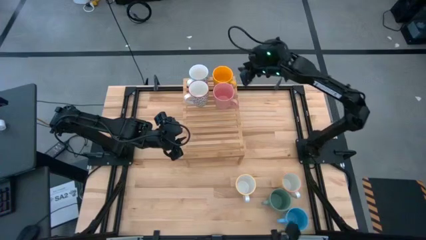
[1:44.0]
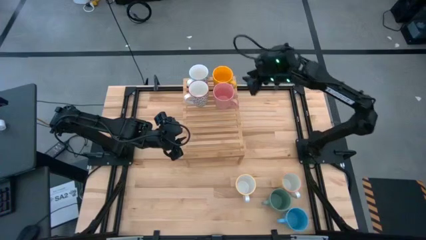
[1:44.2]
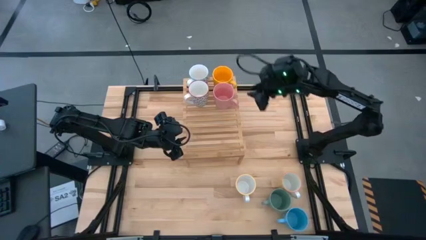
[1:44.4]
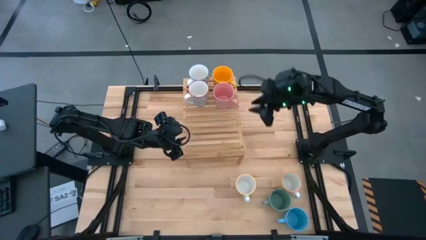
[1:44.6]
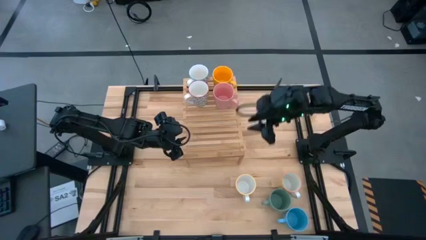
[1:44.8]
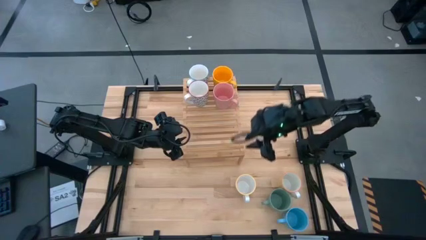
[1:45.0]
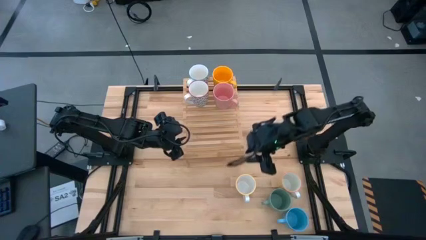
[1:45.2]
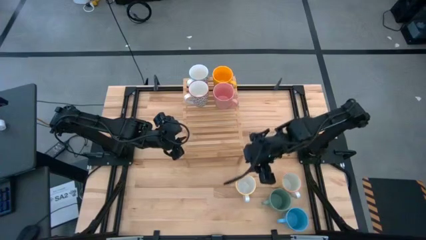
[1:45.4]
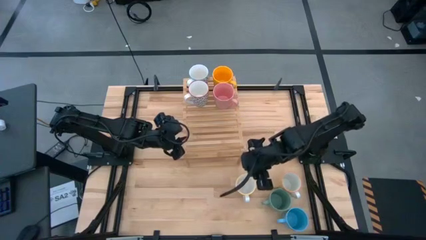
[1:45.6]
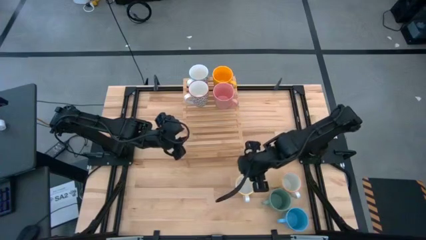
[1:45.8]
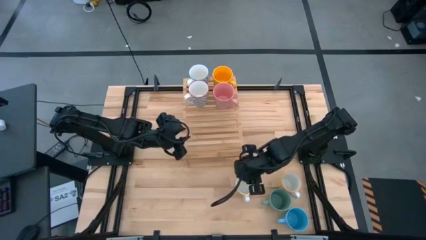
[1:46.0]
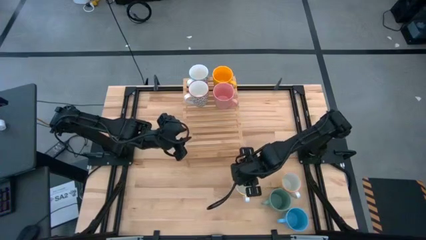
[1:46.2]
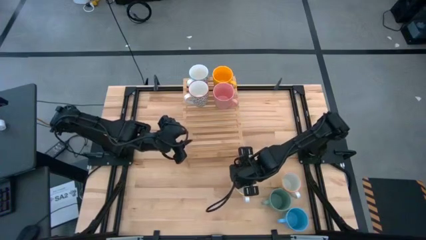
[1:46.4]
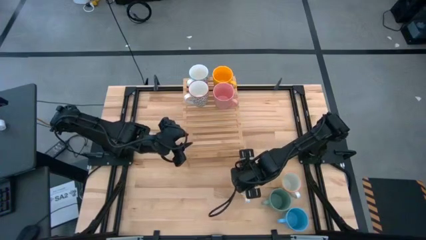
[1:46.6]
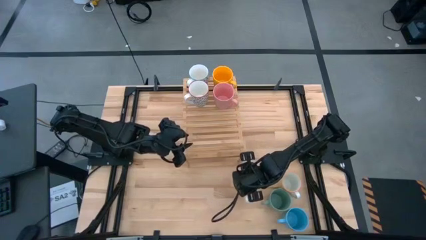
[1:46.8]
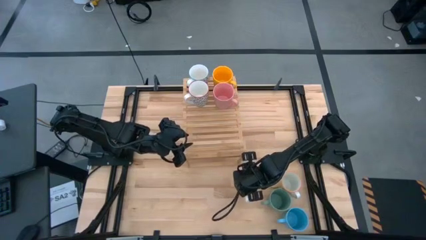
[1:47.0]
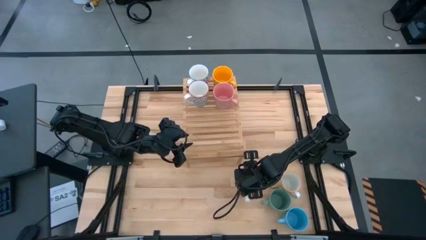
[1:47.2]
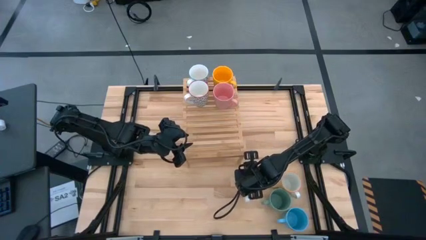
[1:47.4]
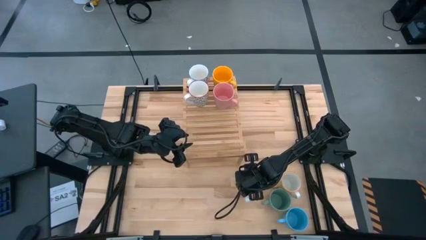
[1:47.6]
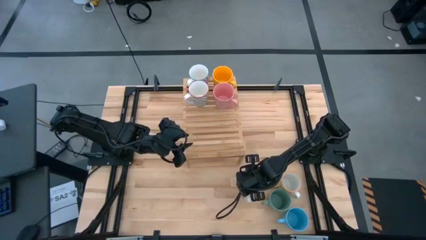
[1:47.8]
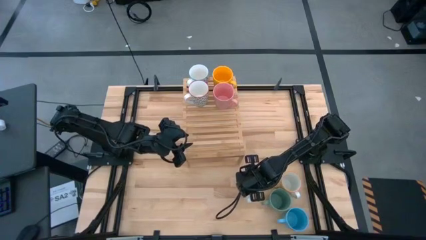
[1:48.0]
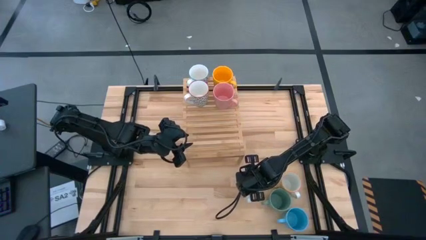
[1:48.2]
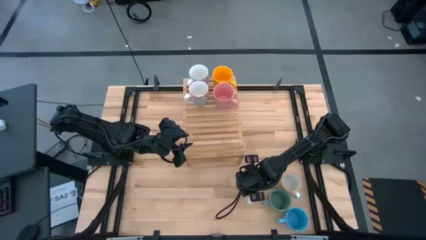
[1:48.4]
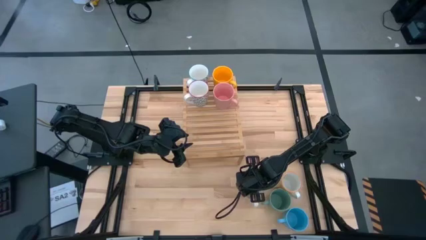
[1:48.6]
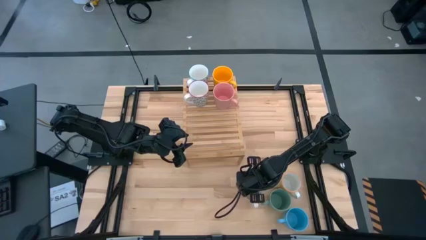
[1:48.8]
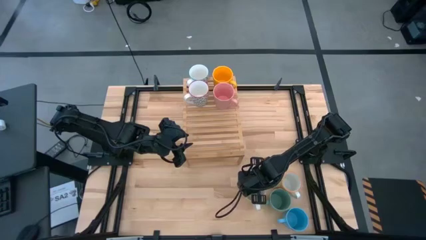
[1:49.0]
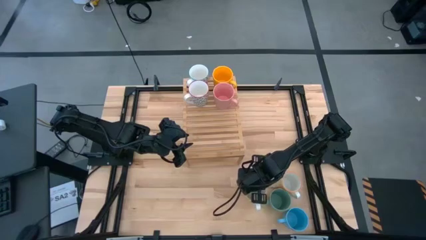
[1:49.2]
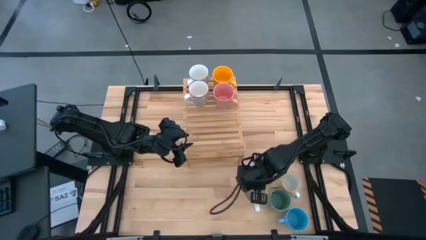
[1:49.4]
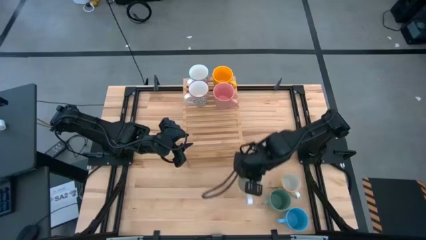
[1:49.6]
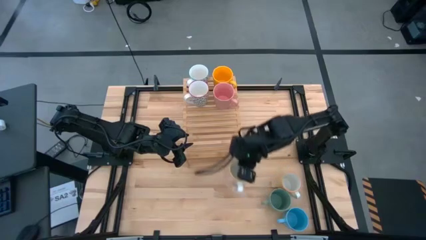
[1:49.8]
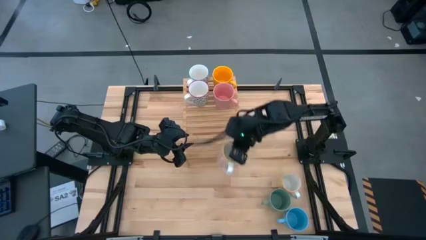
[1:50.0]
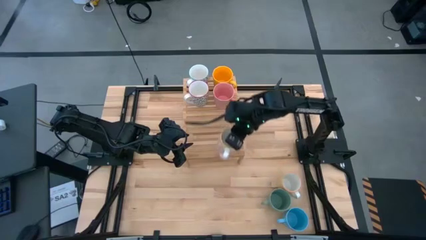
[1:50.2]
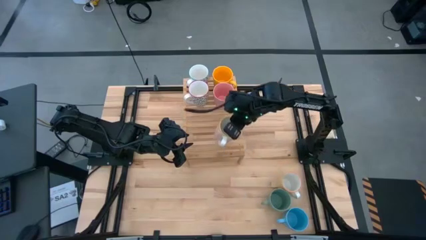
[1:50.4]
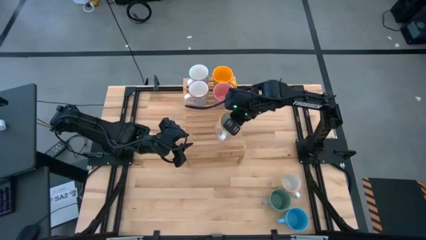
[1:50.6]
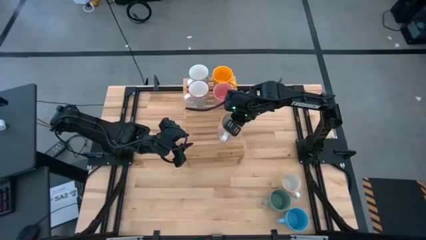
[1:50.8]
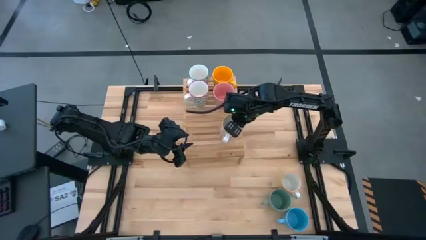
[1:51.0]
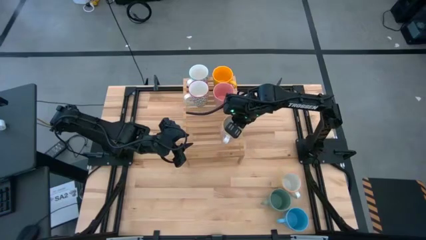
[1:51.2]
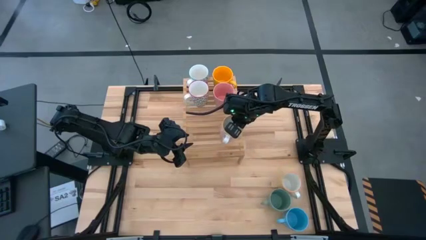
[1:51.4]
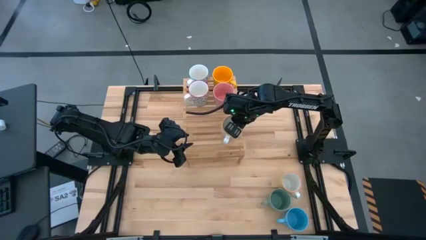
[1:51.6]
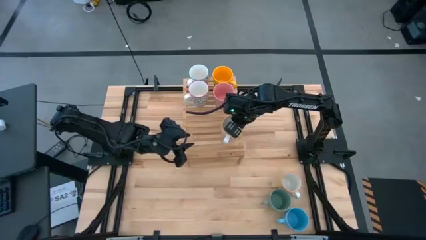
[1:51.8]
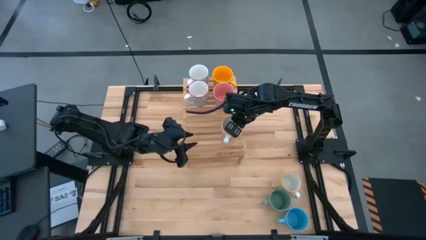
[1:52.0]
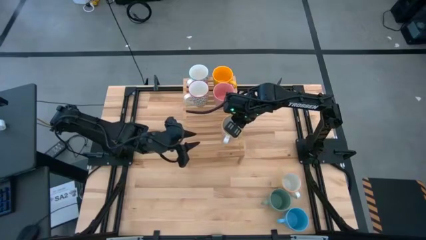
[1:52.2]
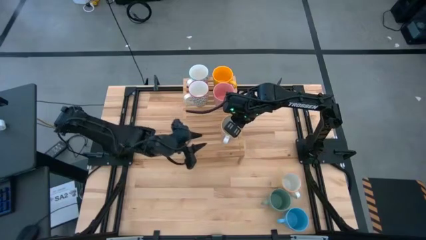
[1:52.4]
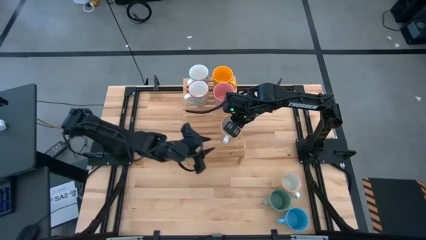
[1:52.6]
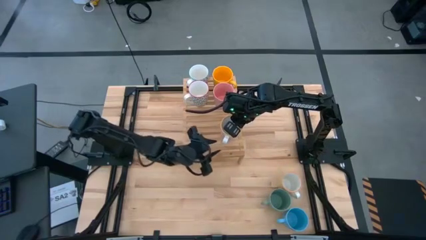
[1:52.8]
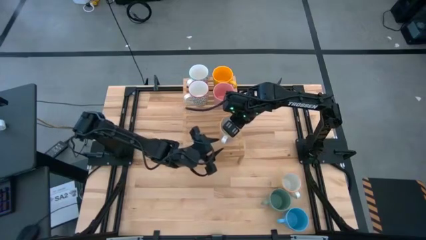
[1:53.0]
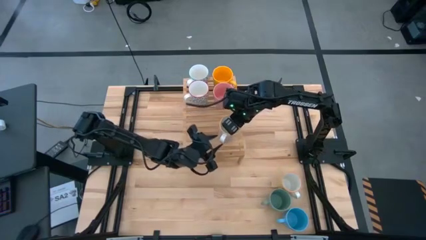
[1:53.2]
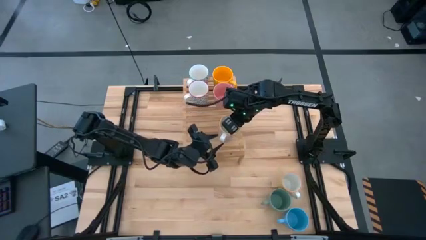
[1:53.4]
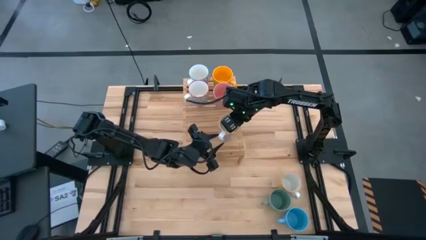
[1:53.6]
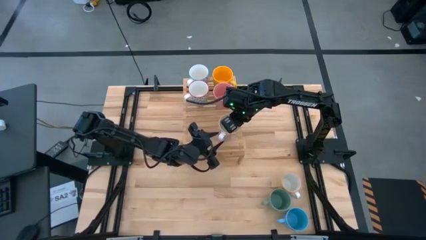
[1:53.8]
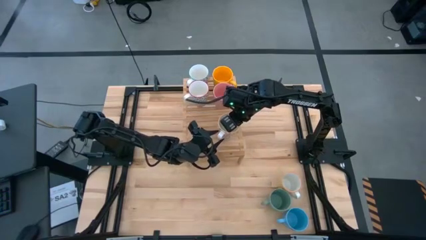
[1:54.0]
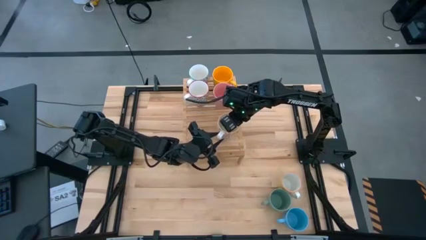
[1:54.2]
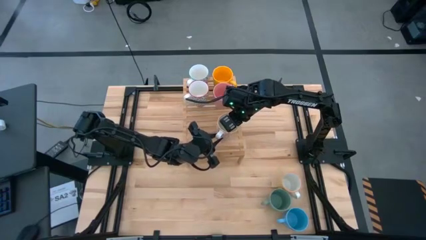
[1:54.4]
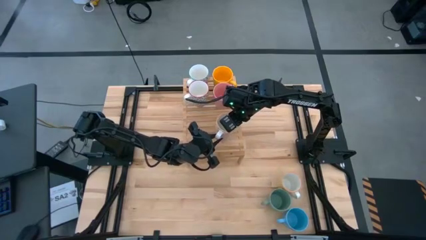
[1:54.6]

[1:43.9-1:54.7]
Task: Place coffee mugs
Put the orange cup on the shelf aligned with the other gray cup

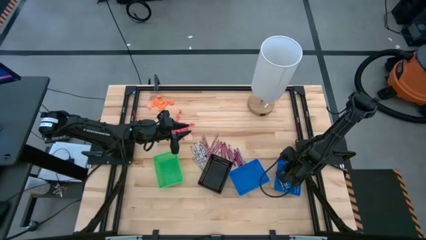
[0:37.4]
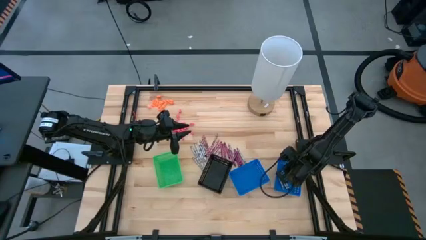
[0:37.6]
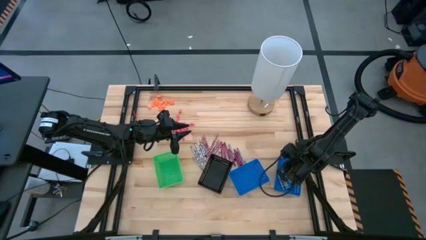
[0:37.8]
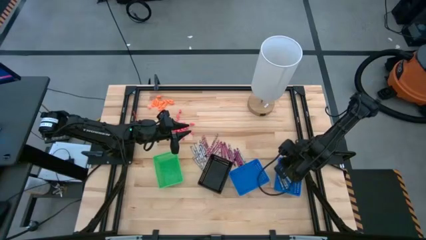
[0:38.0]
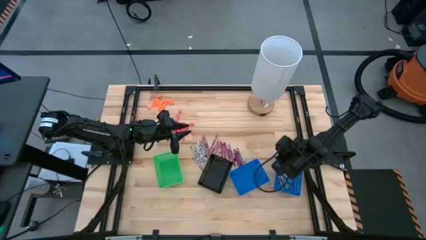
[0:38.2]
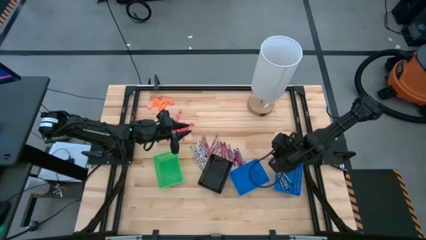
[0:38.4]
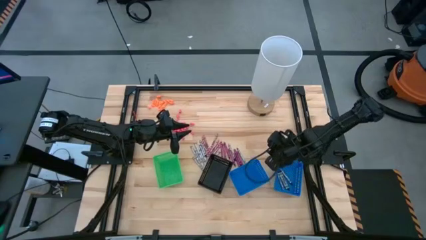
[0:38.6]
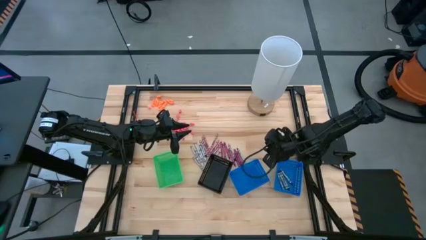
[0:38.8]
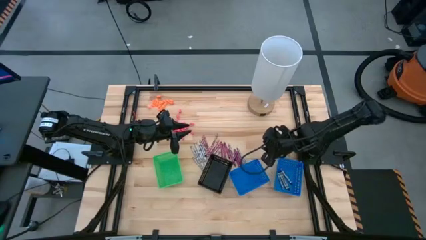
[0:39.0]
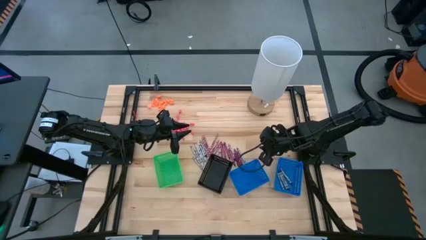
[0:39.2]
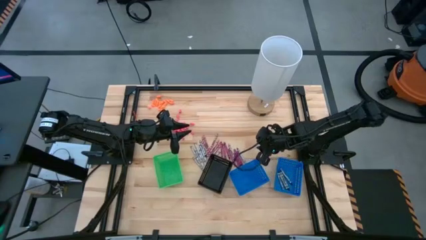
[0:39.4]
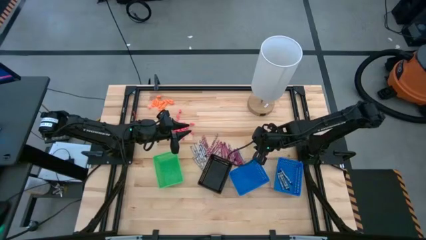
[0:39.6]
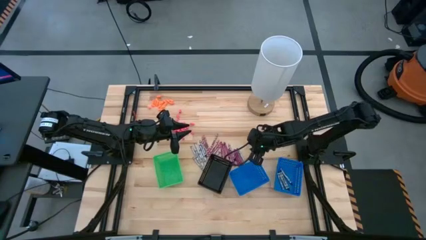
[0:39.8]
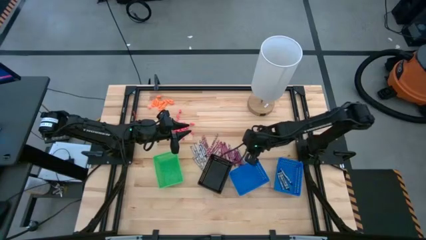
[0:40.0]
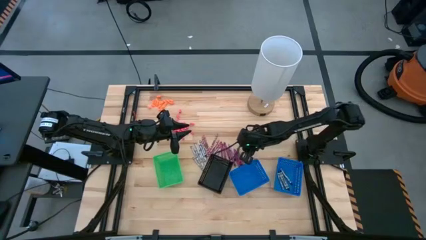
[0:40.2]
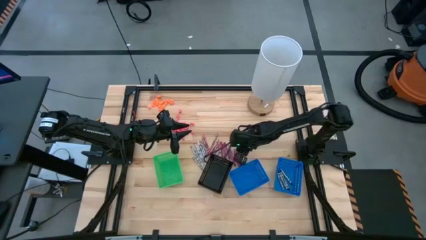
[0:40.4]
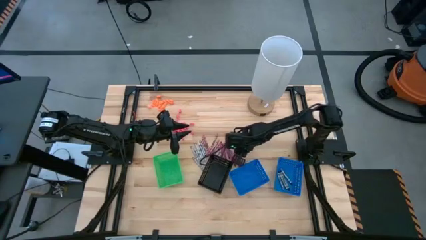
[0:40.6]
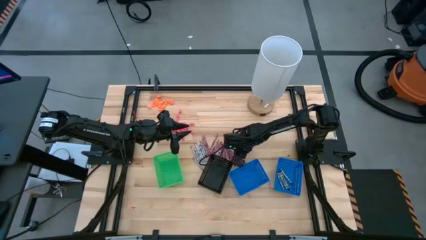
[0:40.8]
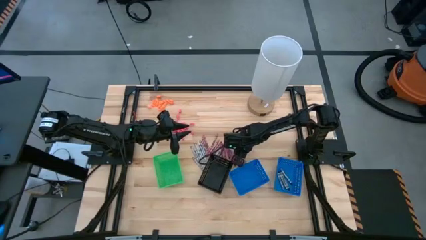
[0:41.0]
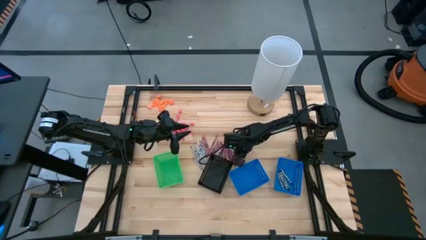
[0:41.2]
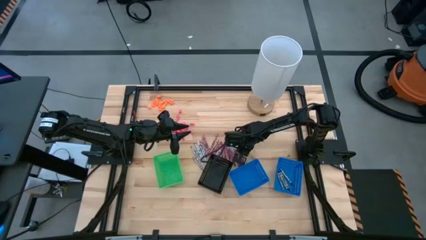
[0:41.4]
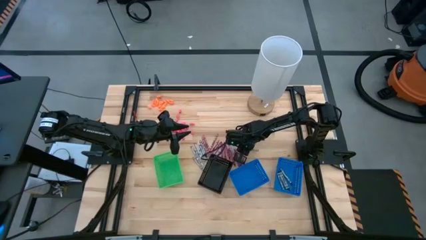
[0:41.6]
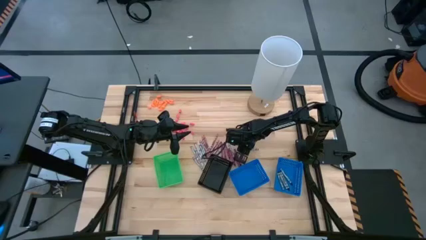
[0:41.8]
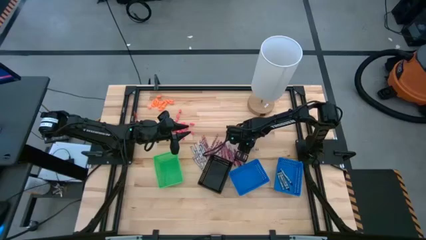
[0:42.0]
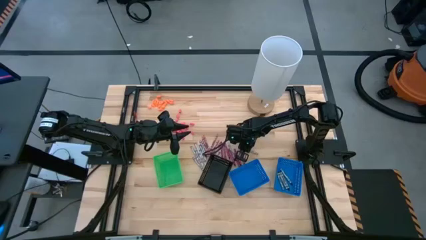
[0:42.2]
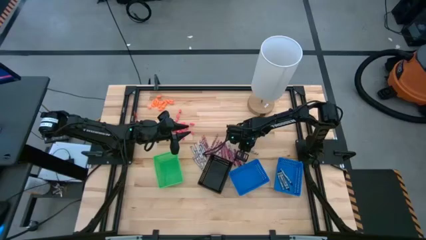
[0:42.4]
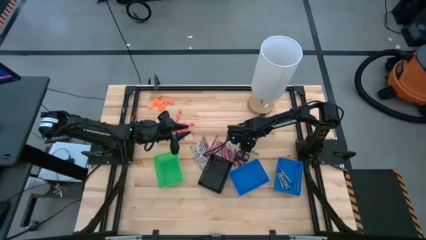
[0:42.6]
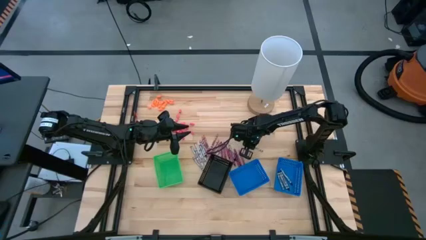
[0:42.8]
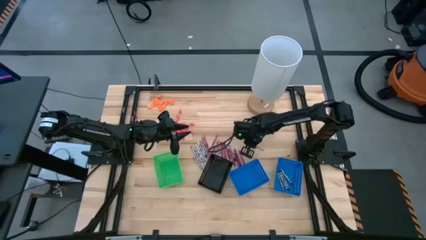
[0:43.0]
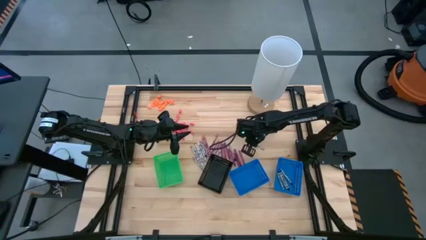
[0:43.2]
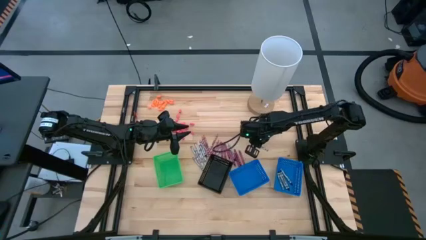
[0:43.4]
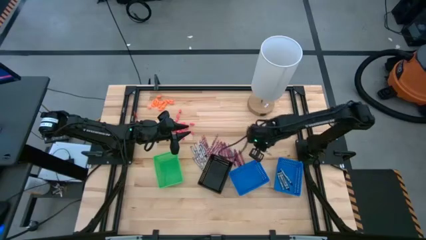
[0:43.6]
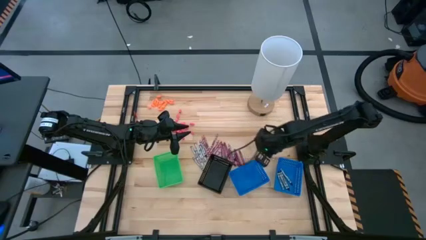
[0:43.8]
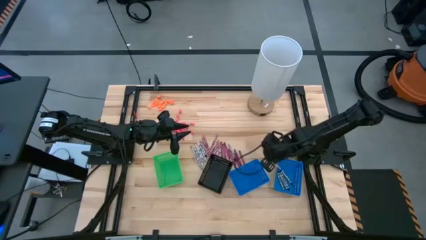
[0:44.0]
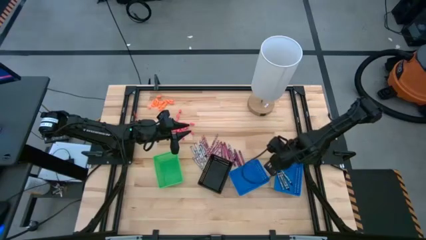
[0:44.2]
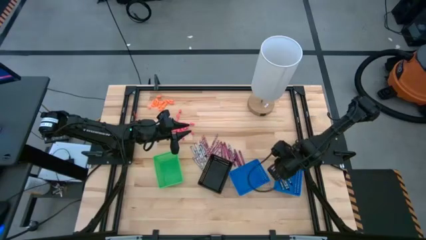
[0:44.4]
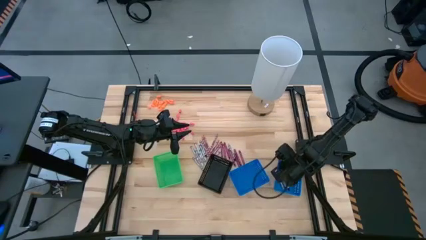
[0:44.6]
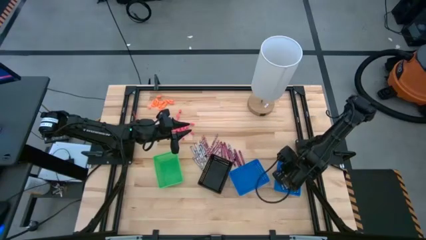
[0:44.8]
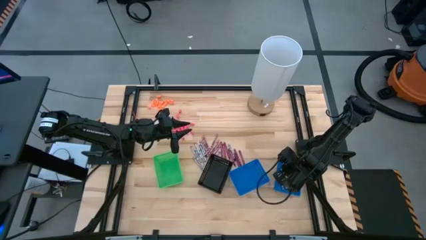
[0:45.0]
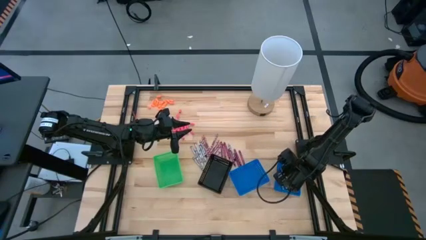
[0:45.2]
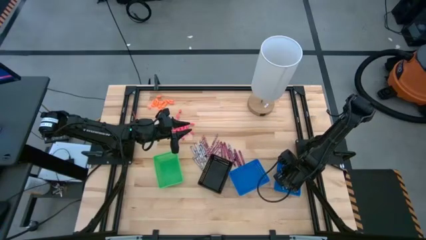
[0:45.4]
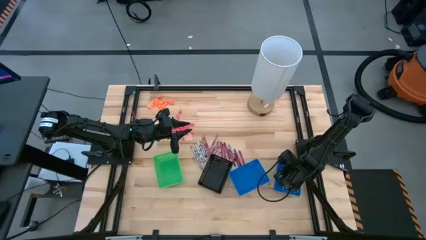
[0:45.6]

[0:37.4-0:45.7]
Task: Sort crayons
Put the black crayon into the right blue bin
